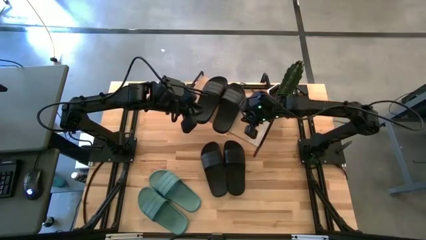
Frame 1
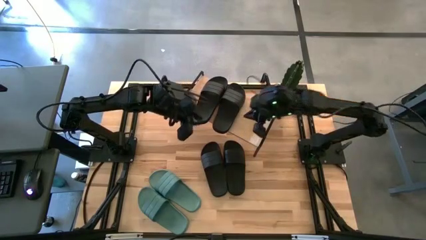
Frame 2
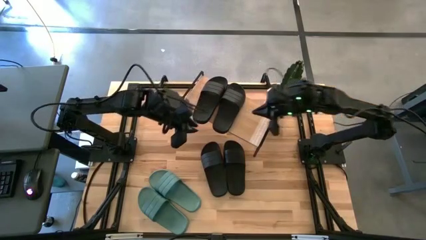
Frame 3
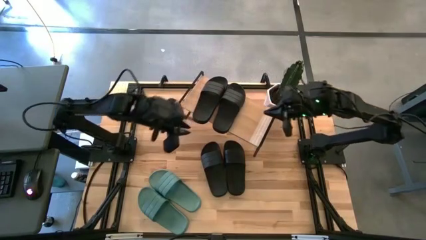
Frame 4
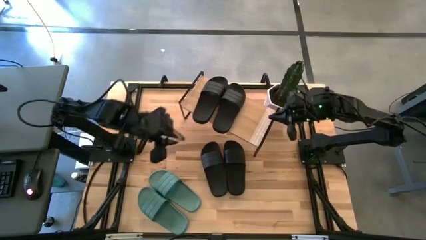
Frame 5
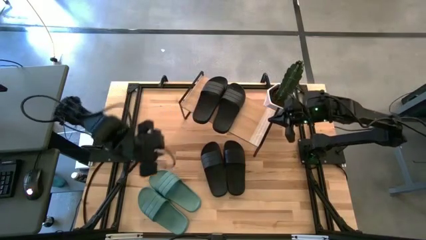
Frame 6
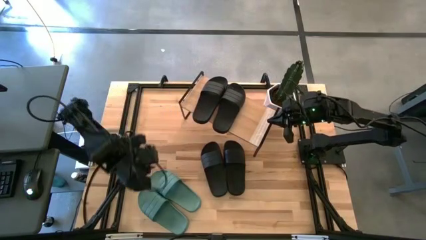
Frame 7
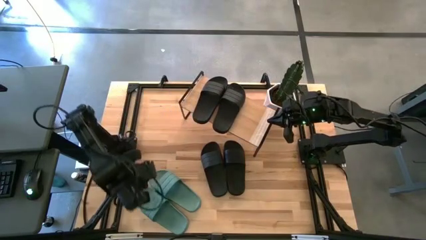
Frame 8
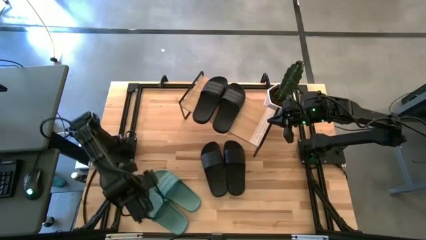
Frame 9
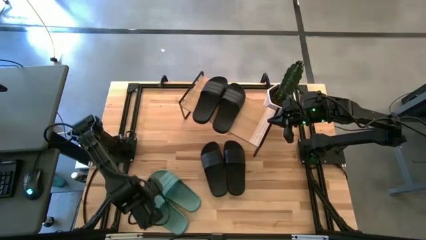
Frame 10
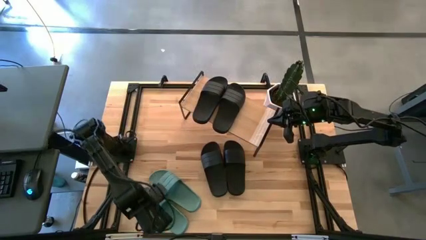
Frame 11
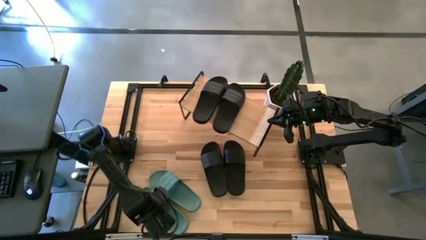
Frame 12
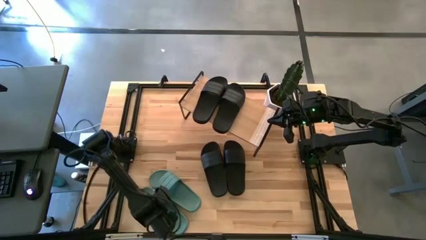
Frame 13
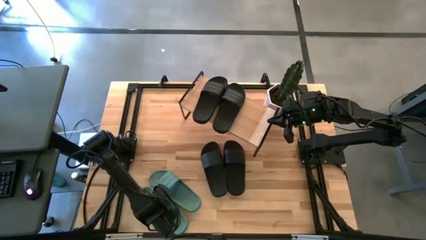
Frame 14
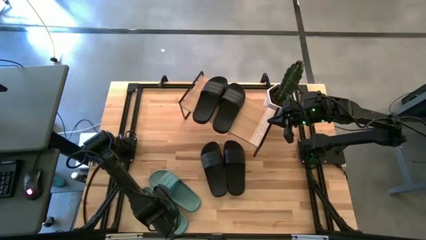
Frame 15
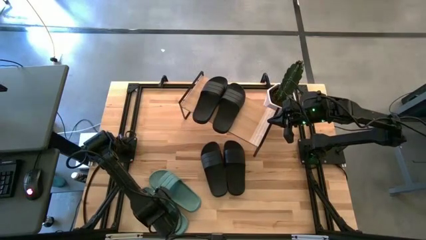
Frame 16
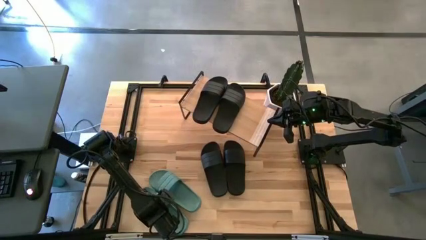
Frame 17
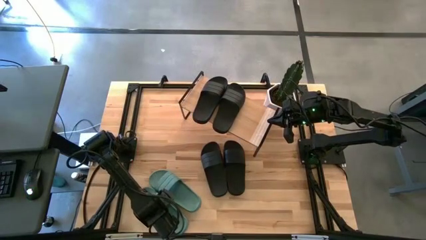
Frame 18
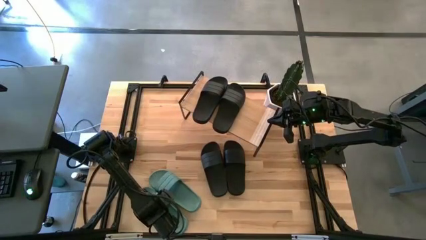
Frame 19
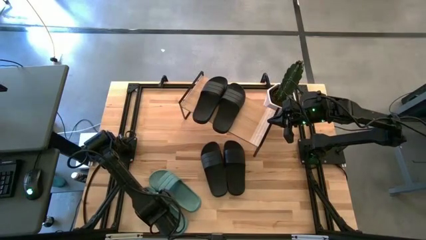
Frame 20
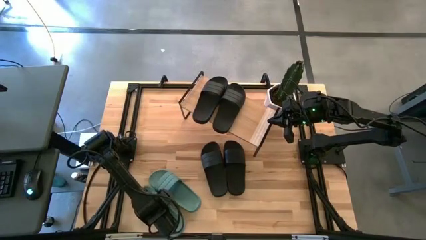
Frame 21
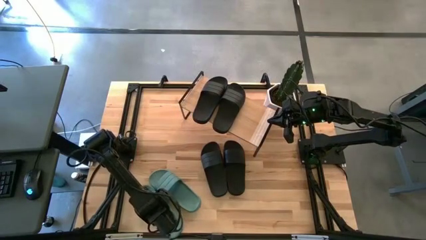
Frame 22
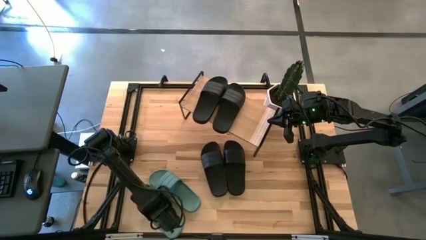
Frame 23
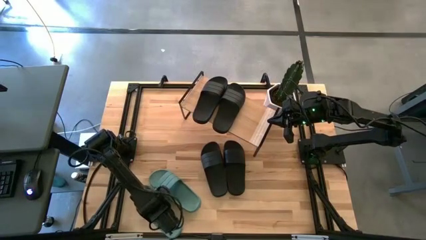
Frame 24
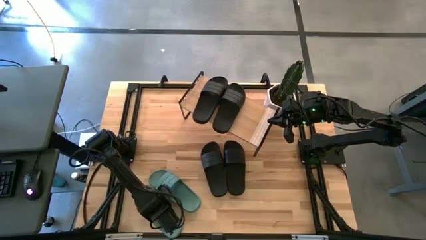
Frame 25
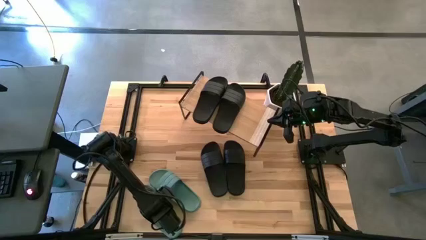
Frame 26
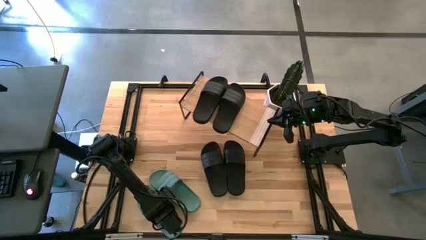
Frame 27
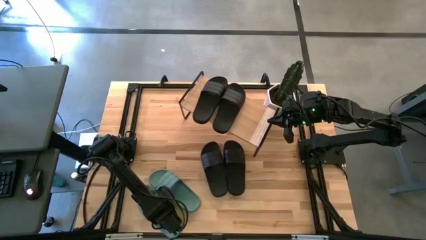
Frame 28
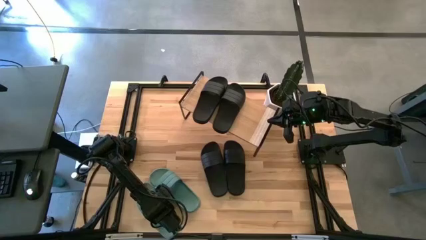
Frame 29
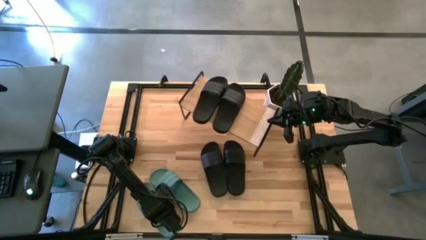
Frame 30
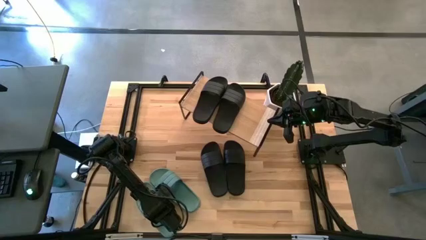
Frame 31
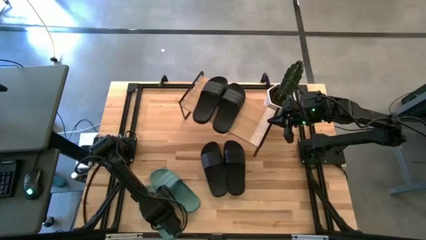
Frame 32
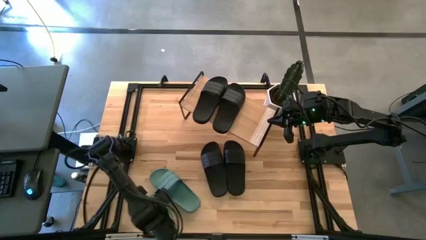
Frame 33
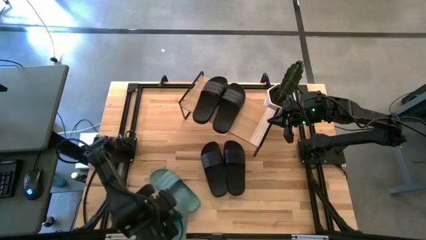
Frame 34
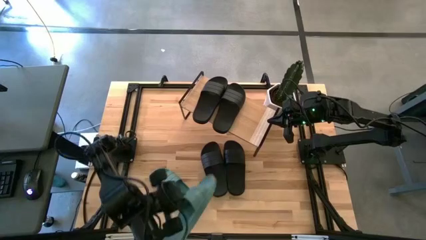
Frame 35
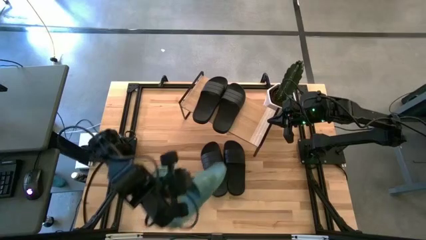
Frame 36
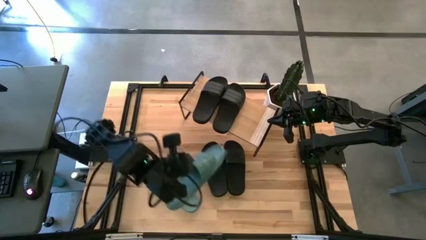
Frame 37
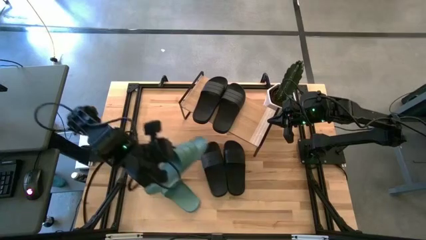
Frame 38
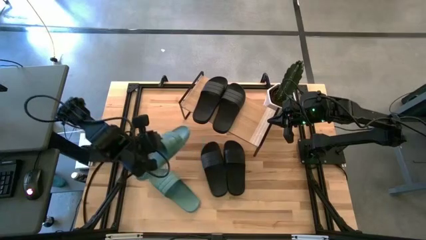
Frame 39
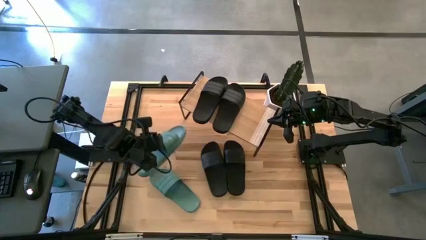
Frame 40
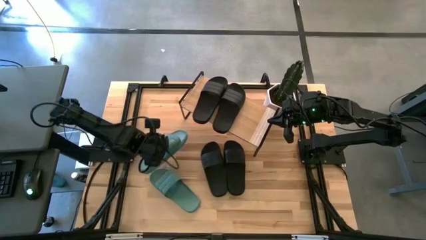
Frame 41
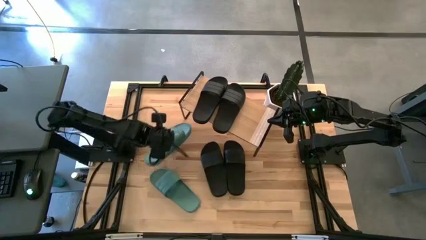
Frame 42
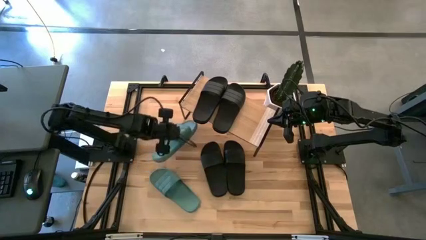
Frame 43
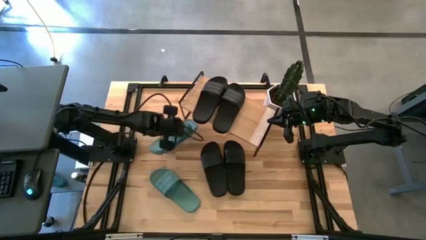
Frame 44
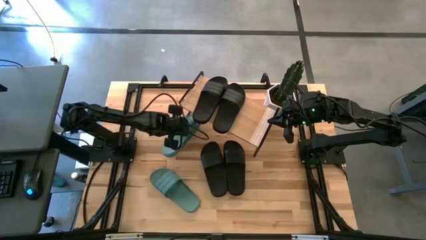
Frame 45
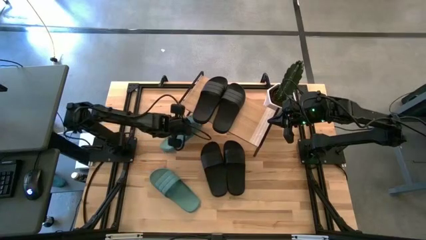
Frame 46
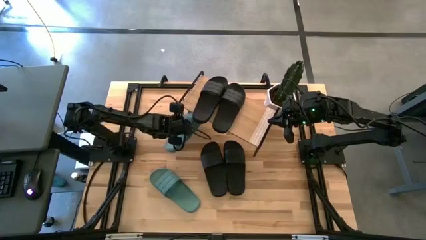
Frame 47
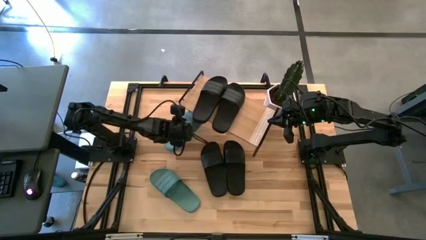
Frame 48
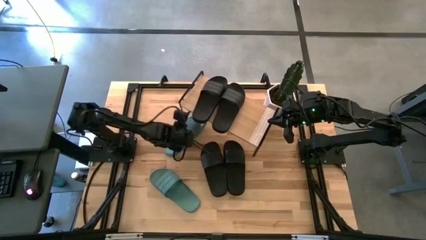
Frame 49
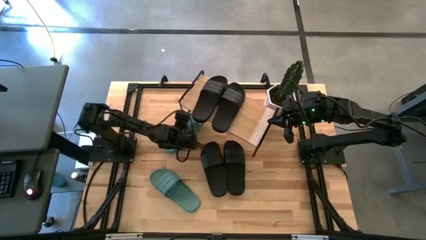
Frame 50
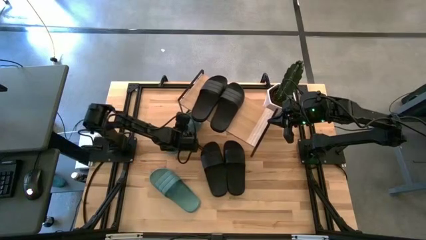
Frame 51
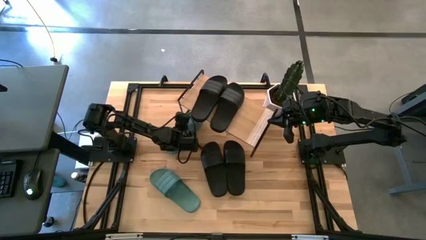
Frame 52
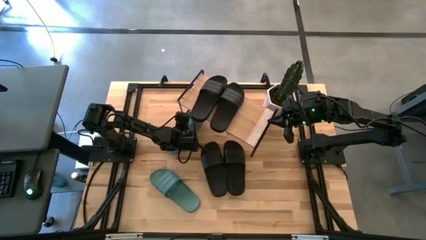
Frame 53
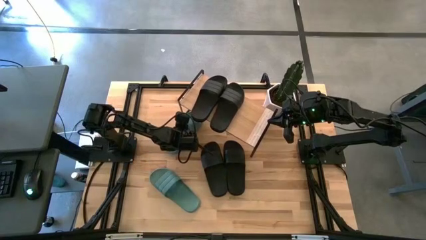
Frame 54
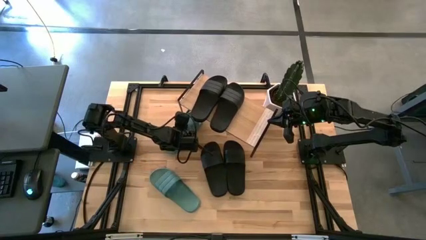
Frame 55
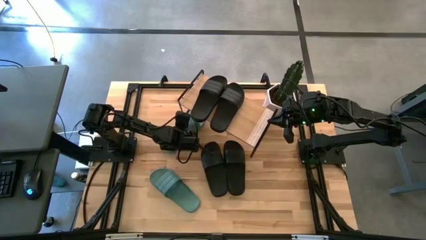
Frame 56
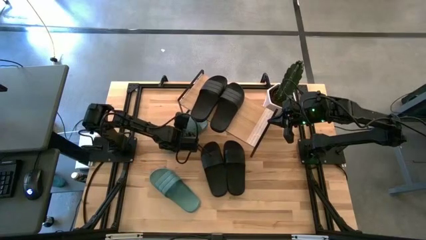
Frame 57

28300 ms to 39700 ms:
Task: Pick and place slides into the shelf
Put the green slide under the shelf

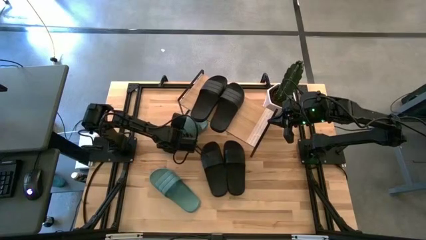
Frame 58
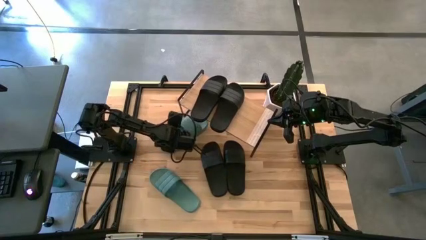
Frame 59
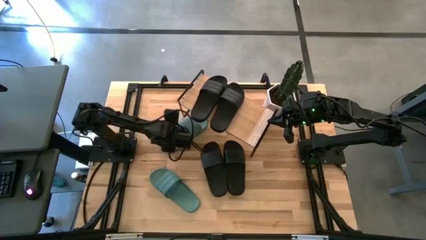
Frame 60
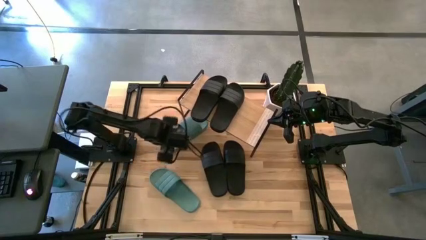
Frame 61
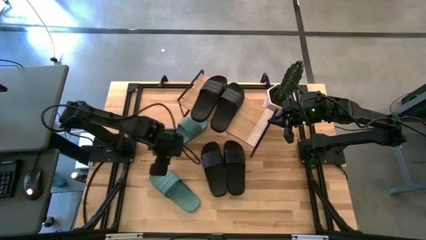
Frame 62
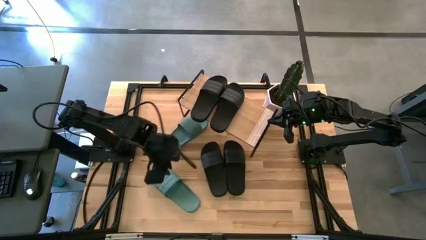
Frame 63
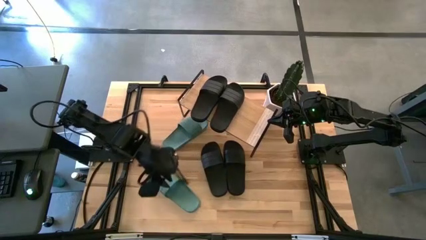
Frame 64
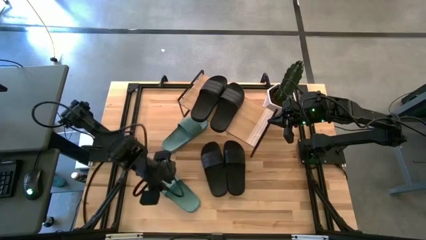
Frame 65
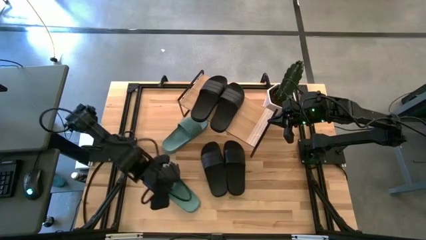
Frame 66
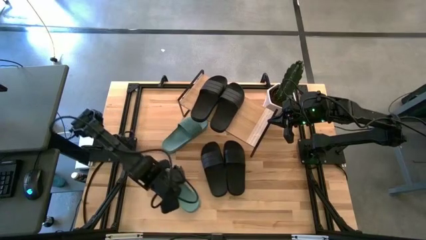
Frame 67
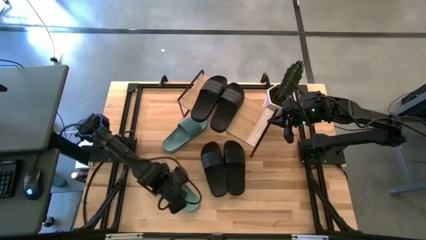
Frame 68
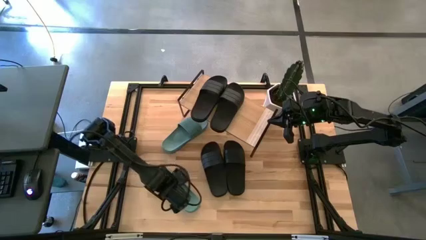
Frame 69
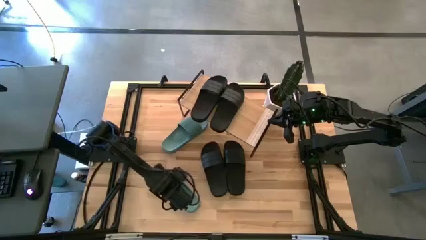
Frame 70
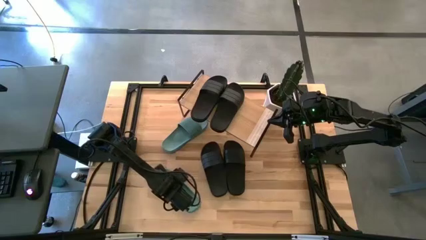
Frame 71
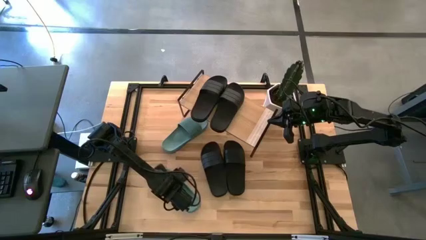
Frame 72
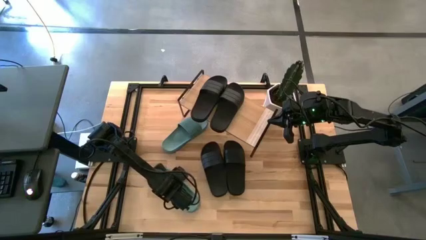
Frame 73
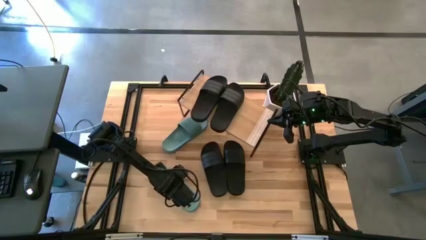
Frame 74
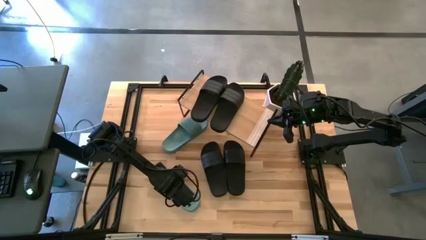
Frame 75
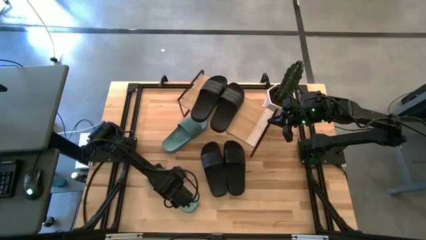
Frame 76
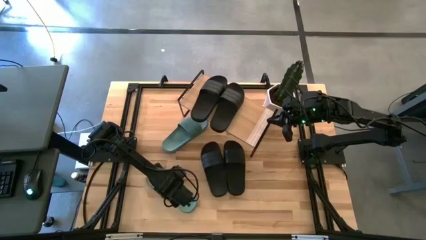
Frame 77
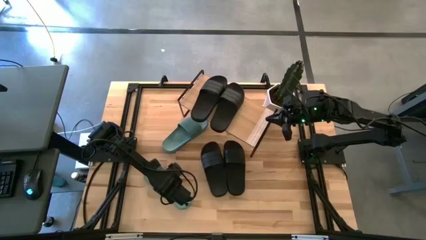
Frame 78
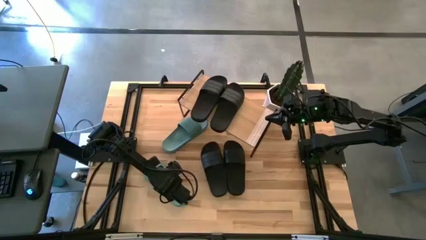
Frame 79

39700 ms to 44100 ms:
Put the green slide under the shelf
